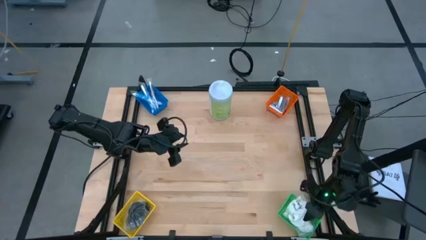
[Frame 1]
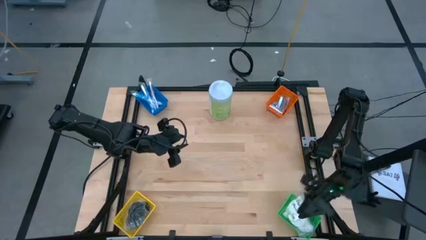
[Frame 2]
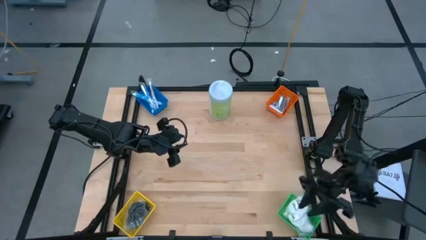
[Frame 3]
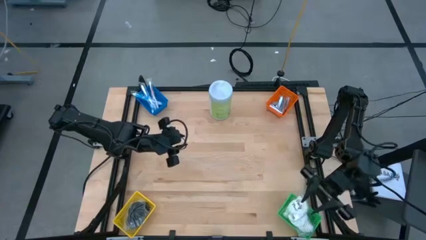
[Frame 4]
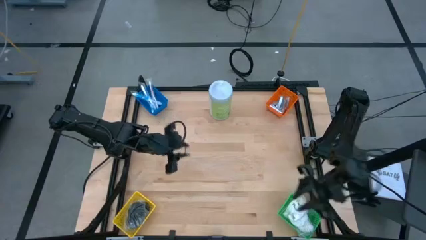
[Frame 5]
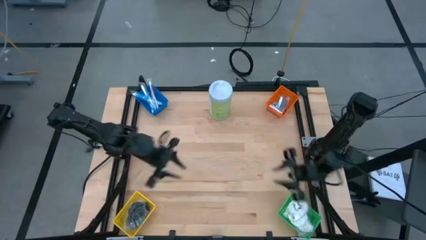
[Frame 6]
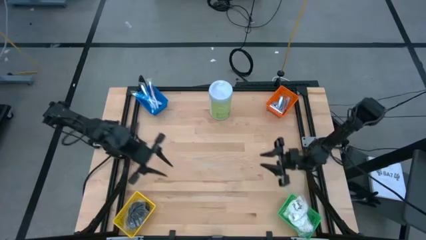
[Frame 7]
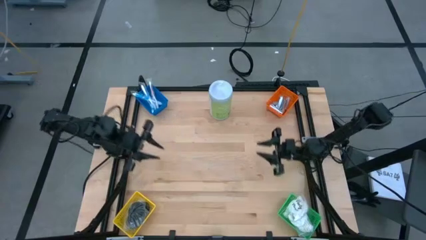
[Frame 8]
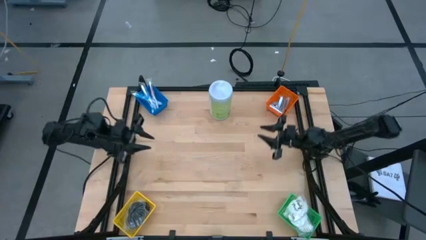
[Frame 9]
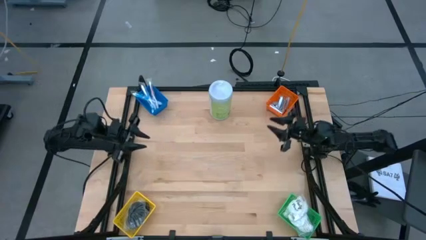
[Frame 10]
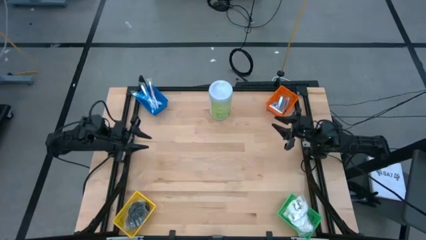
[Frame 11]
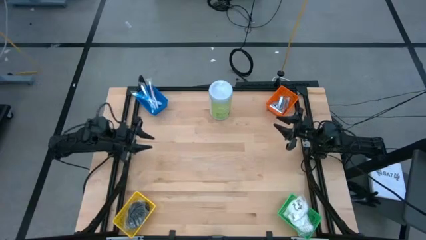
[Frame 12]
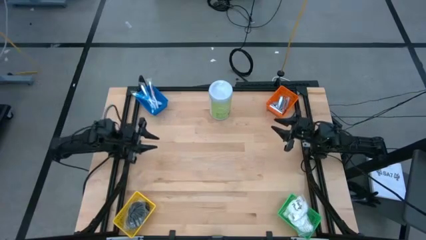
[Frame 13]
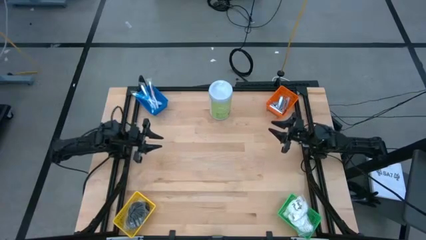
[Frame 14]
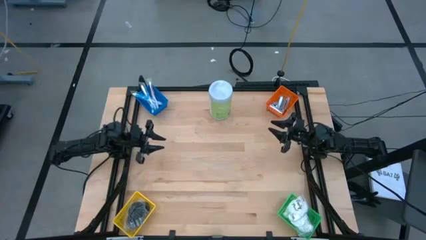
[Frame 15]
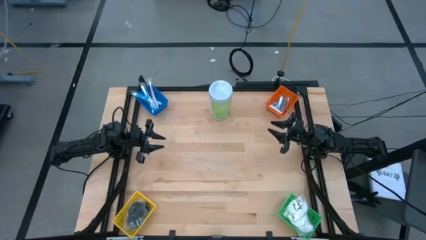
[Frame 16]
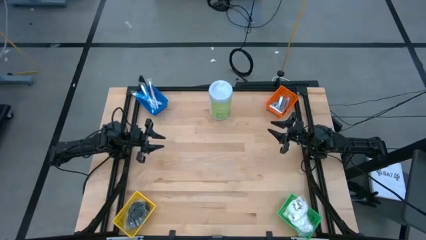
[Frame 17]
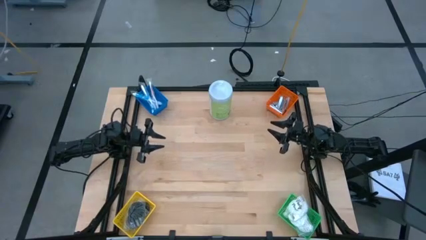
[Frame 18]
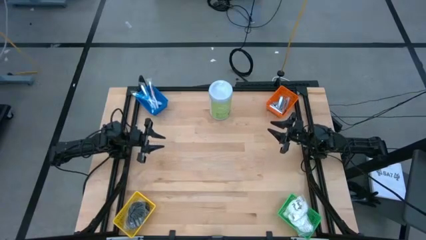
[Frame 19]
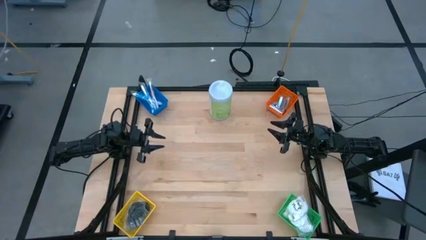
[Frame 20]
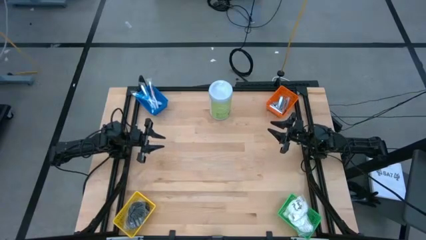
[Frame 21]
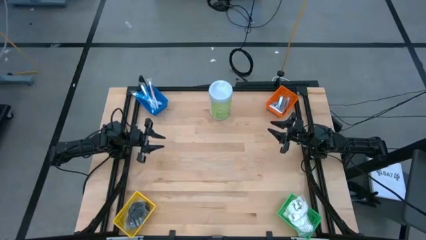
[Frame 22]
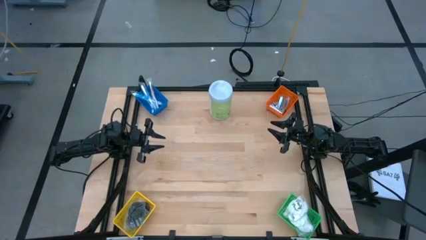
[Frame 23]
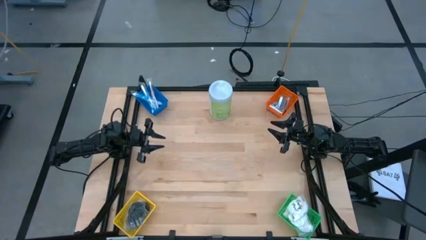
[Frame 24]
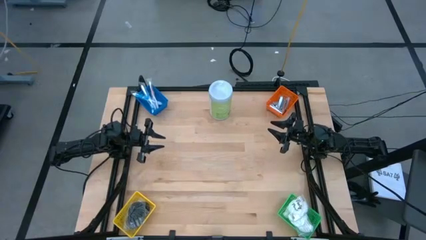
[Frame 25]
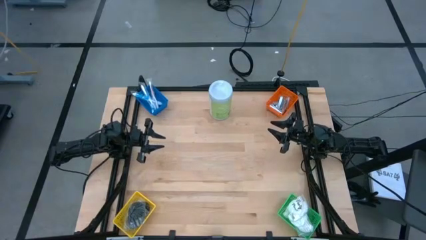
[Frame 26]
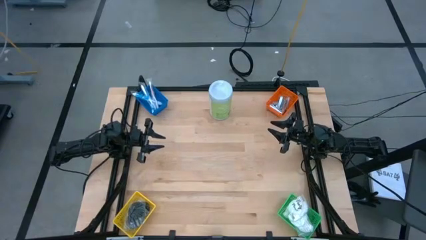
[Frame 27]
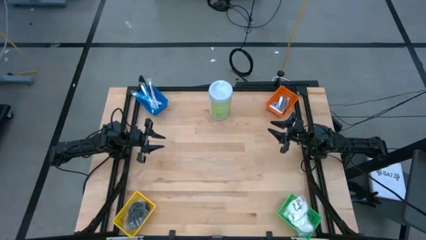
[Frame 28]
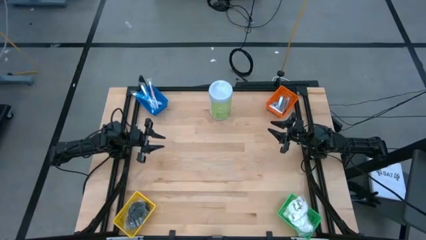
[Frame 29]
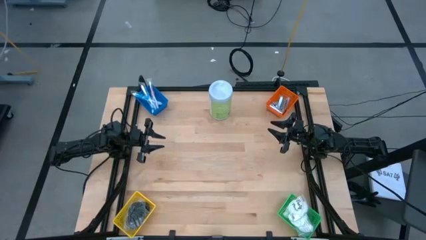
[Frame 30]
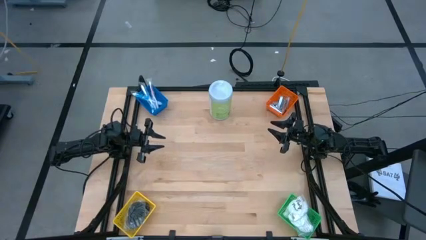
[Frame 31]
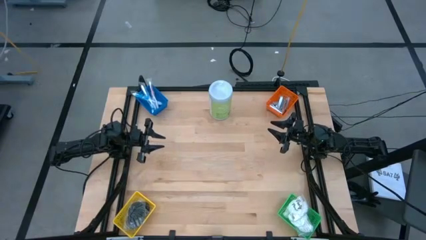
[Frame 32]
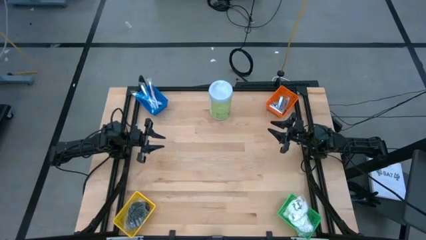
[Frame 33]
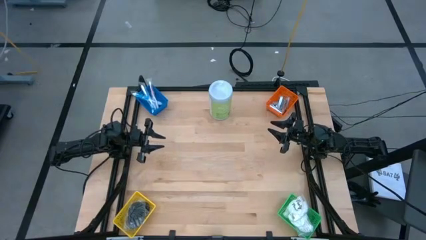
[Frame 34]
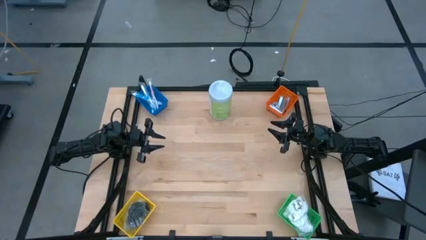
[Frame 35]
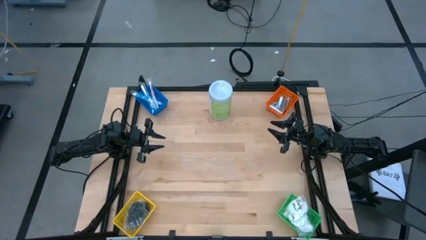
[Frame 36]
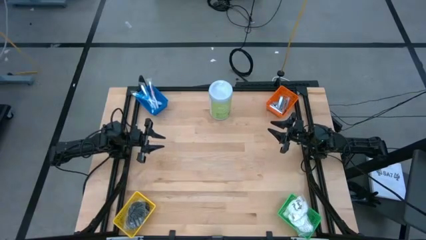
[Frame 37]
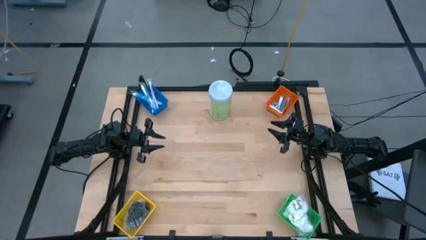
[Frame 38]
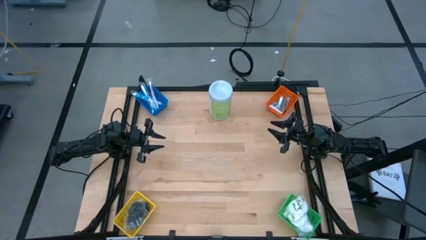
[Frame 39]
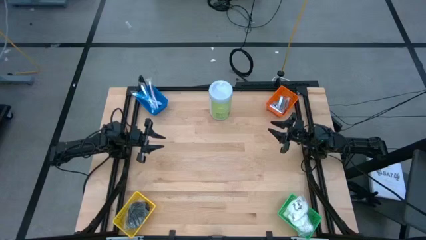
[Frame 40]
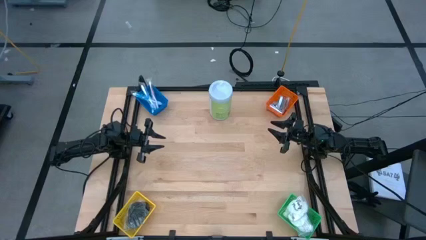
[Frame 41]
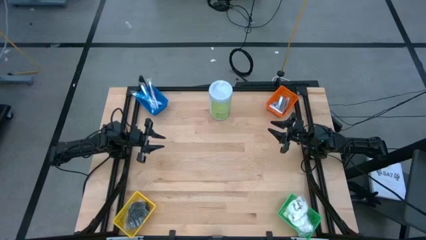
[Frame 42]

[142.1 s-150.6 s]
Task: Pick & Place Travel size toiletries
Return to Home Position

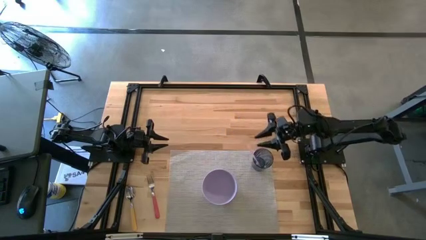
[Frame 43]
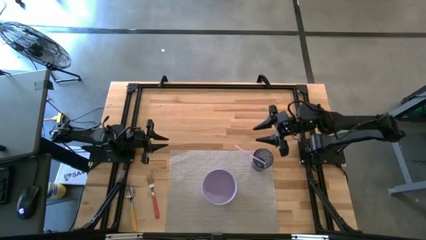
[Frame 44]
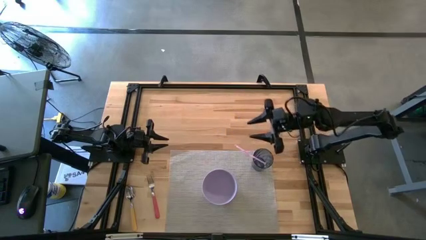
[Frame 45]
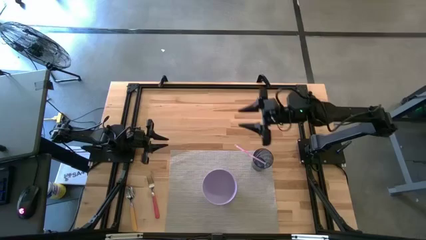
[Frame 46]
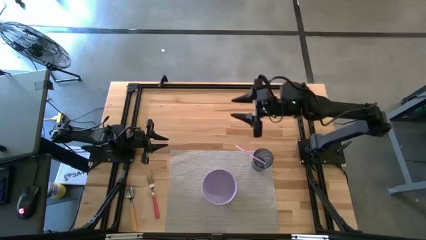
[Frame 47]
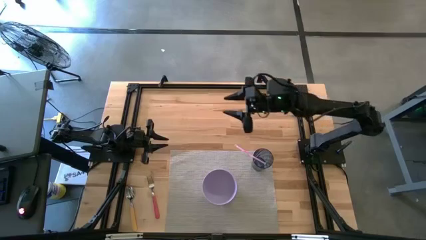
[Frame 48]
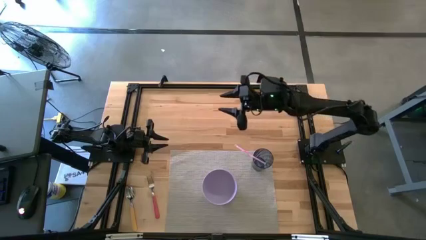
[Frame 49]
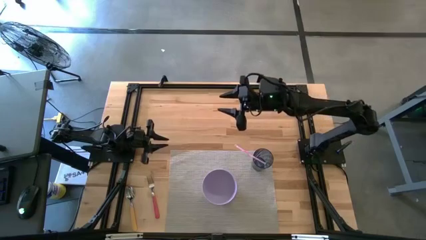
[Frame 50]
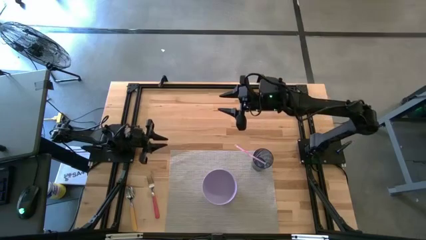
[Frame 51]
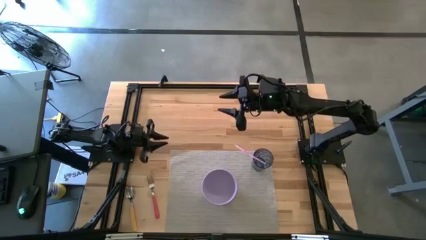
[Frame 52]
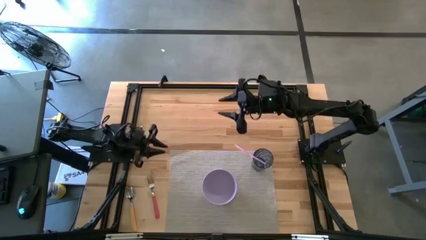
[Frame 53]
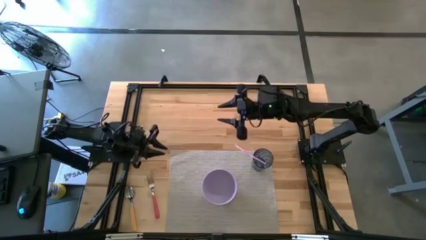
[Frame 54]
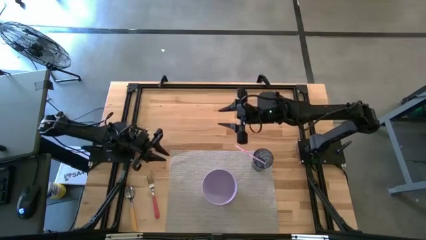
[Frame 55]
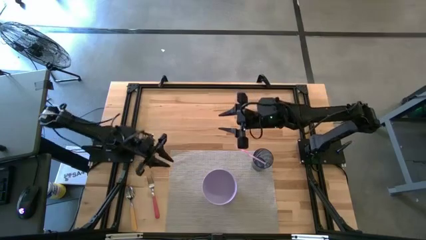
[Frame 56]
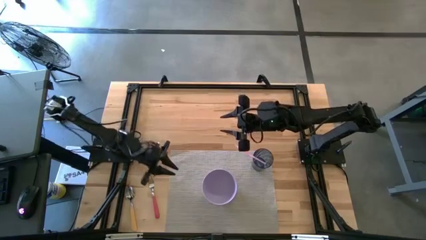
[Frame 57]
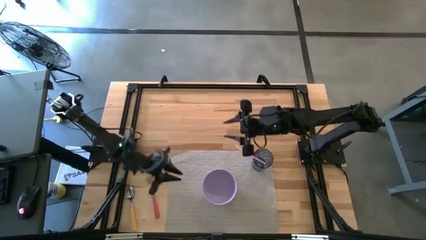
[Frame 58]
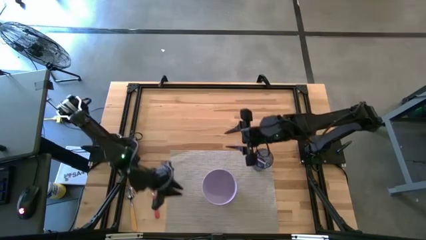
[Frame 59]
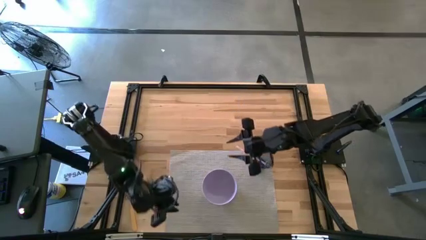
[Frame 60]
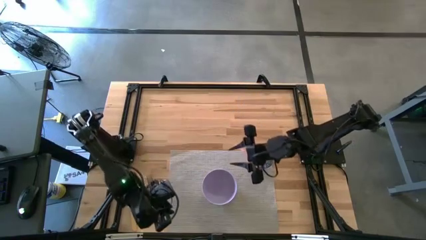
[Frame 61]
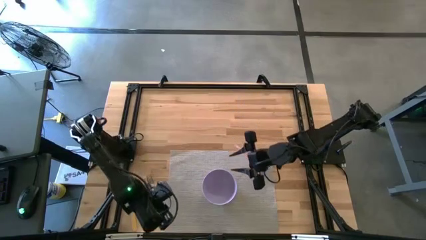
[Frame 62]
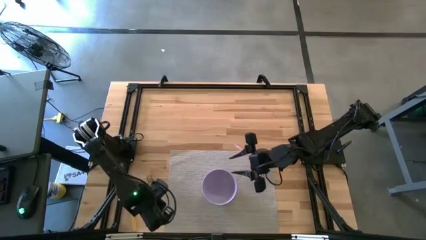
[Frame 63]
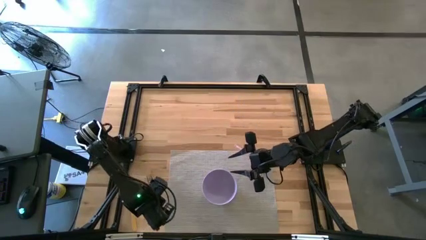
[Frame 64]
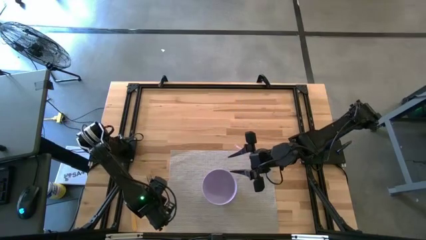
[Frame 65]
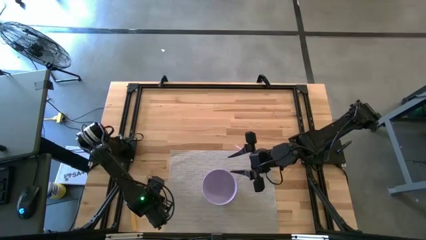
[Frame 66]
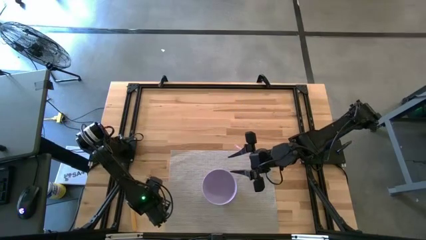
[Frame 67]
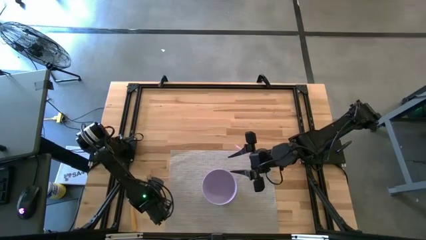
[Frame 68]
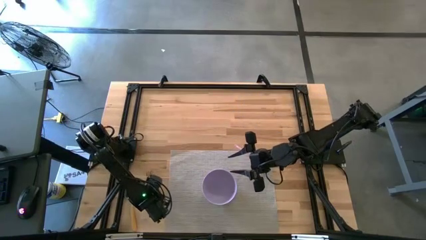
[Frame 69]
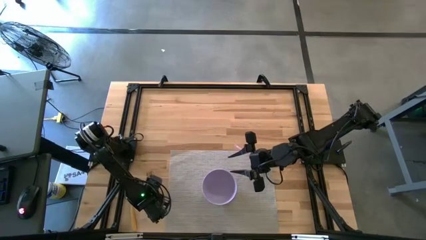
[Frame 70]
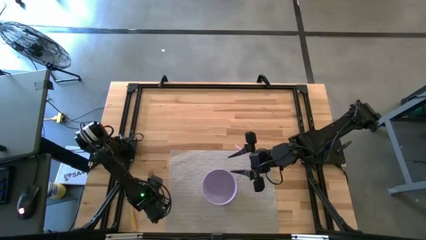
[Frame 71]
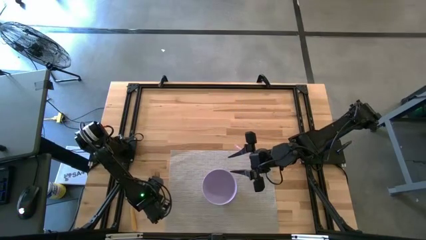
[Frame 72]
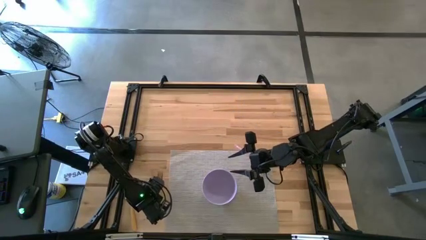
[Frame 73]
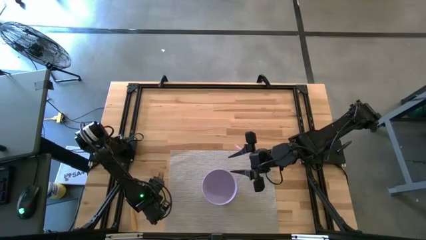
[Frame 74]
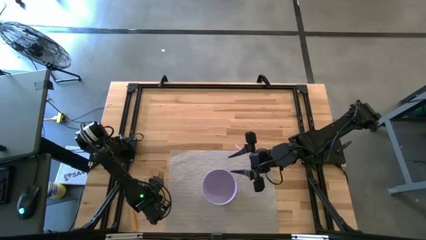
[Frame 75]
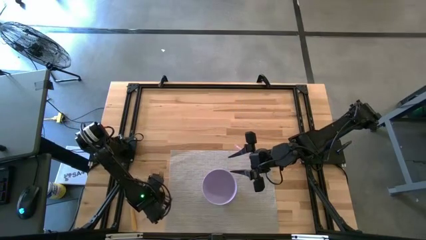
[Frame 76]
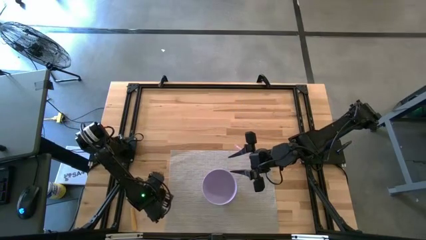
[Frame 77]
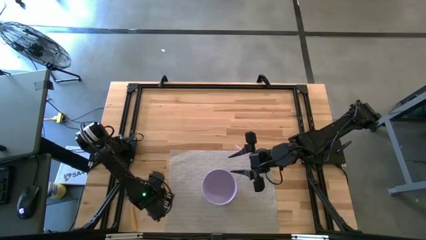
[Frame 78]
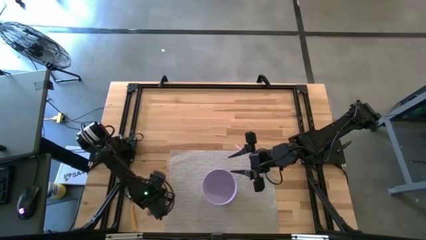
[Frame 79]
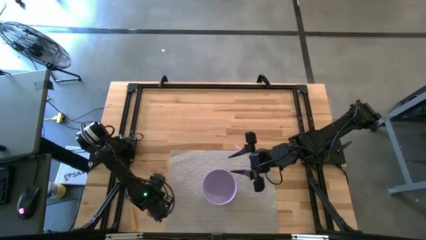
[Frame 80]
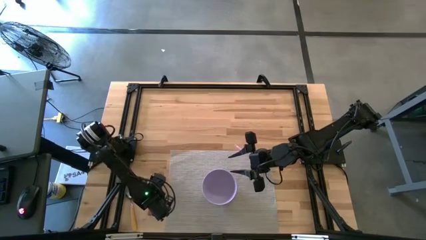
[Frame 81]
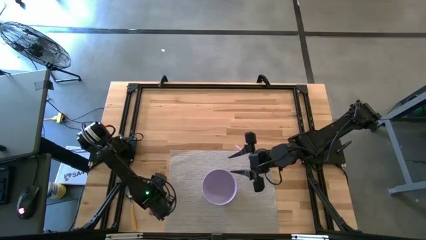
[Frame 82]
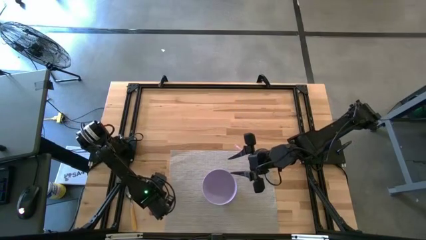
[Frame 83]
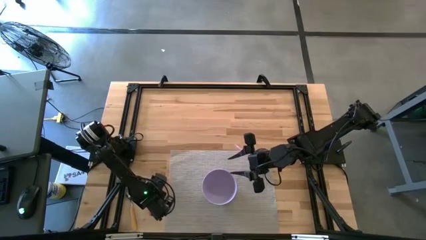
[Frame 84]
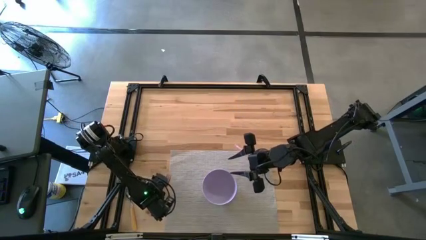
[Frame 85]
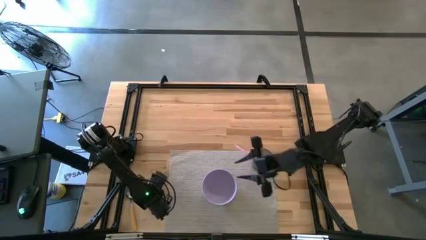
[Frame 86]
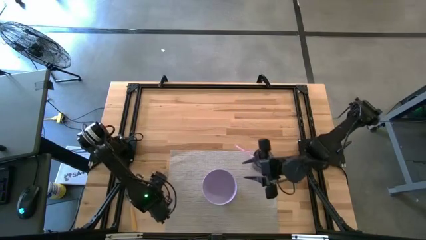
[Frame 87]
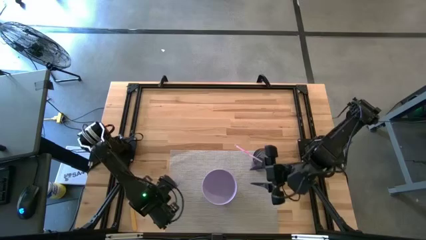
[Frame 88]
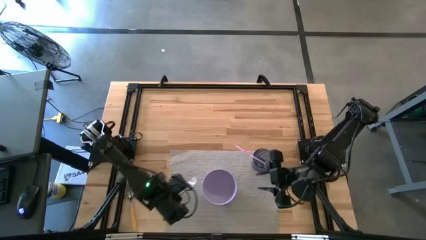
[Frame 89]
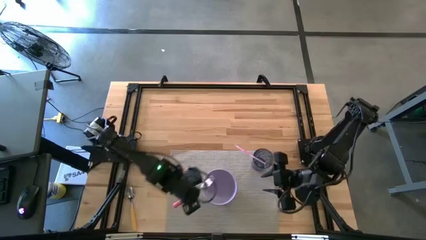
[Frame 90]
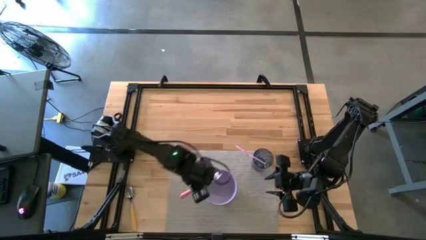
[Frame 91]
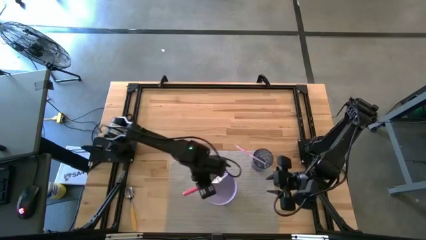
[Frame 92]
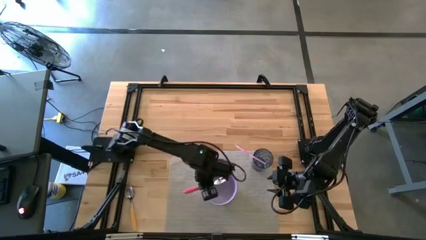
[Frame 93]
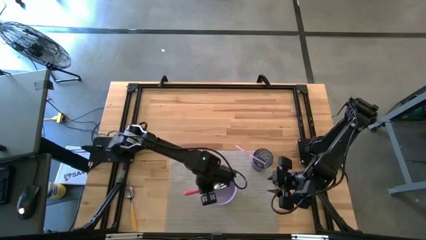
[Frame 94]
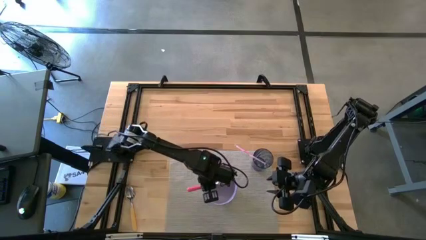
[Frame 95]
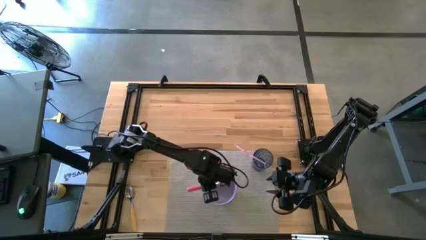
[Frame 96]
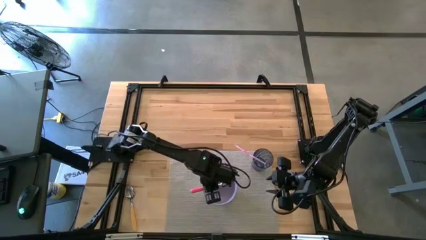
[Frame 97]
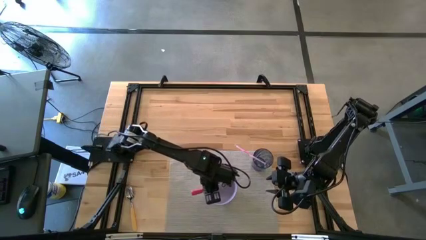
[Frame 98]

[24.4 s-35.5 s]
Task: Pick & Place Utensil
Put the red fork into the purple bowl on the gray mat
